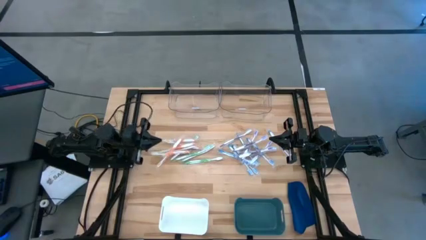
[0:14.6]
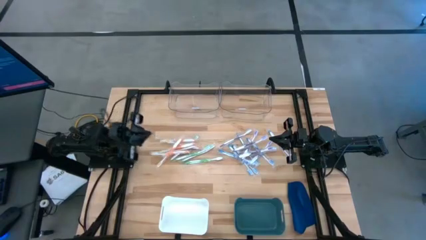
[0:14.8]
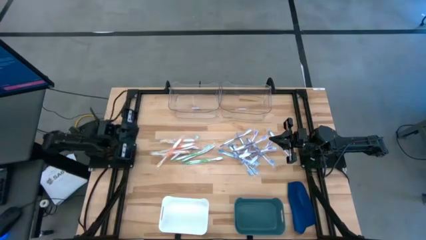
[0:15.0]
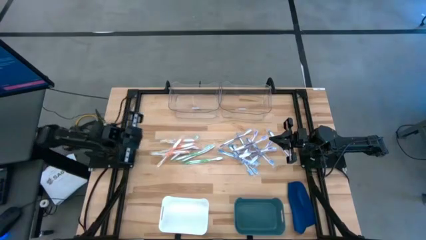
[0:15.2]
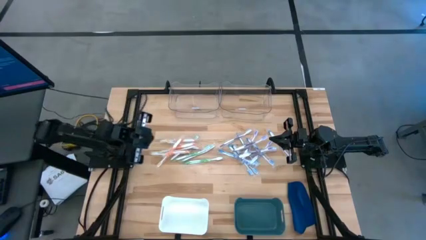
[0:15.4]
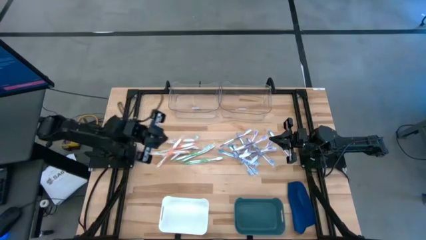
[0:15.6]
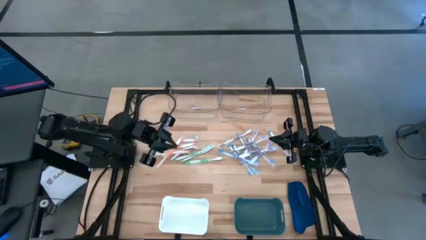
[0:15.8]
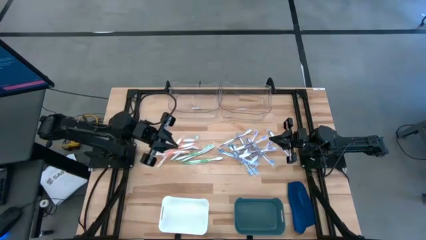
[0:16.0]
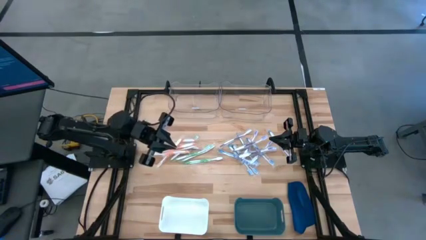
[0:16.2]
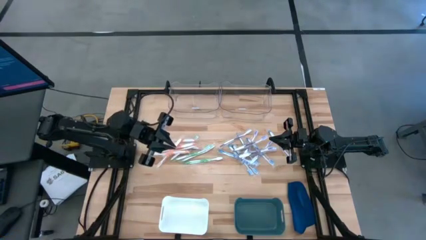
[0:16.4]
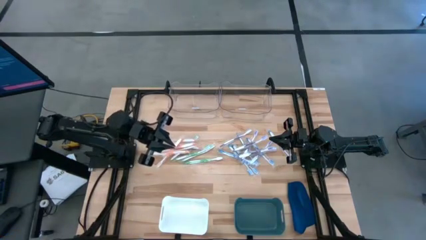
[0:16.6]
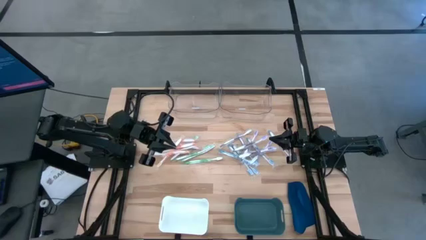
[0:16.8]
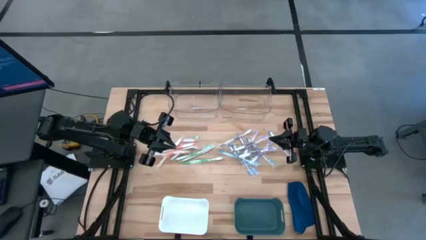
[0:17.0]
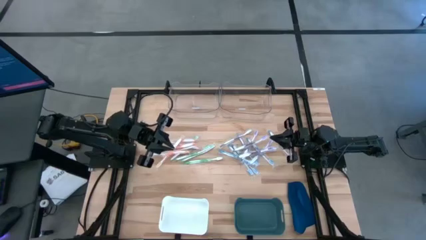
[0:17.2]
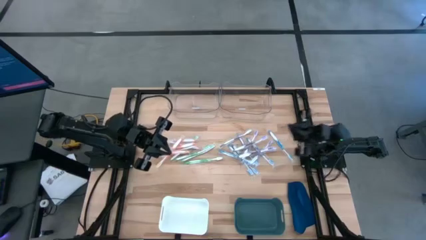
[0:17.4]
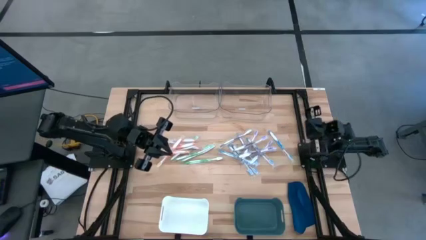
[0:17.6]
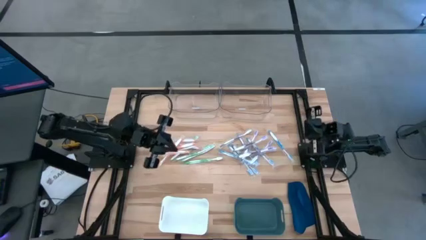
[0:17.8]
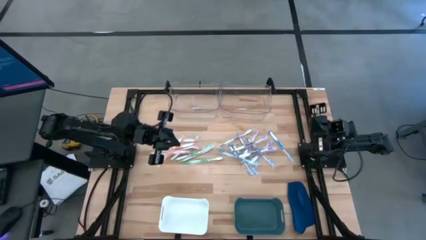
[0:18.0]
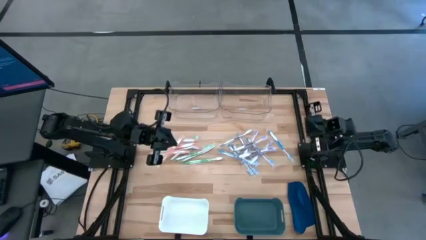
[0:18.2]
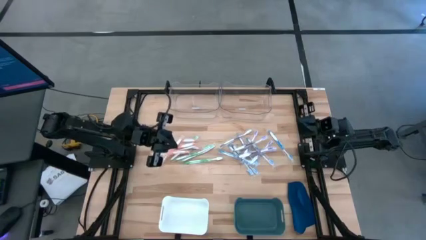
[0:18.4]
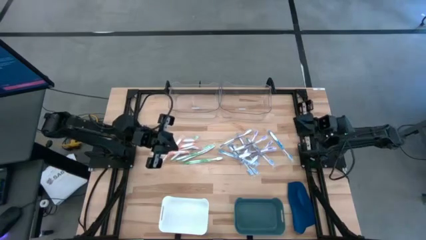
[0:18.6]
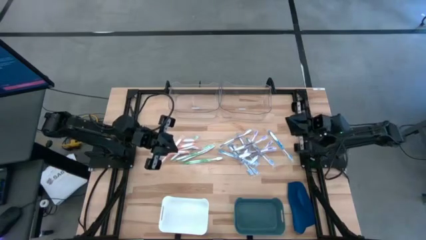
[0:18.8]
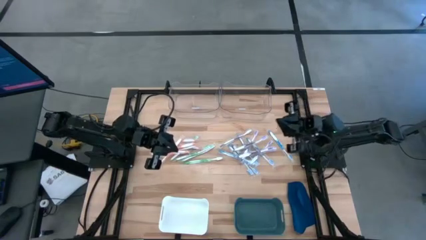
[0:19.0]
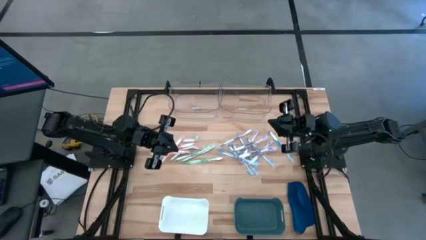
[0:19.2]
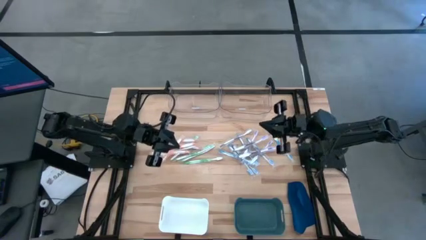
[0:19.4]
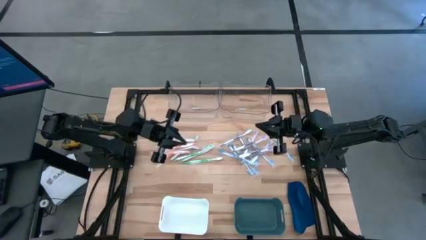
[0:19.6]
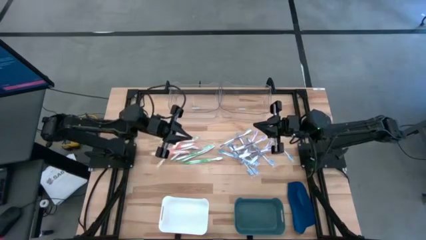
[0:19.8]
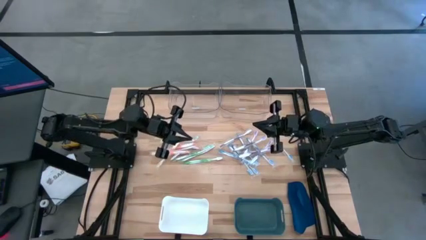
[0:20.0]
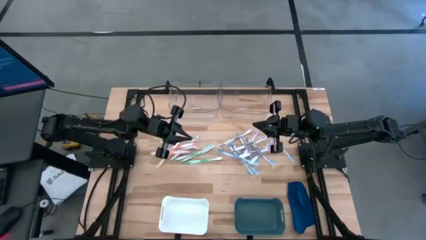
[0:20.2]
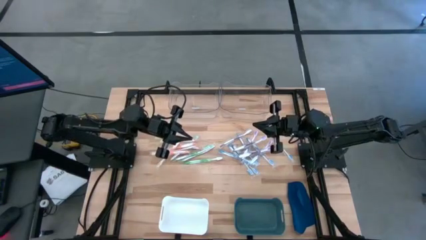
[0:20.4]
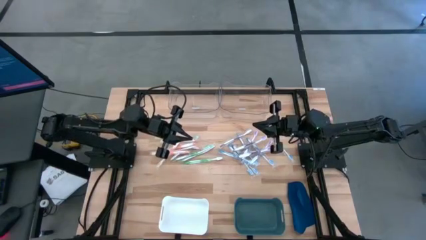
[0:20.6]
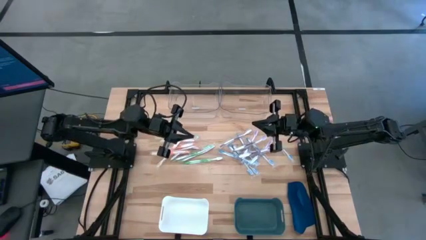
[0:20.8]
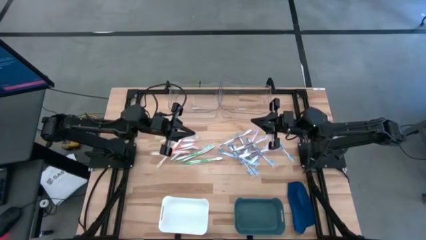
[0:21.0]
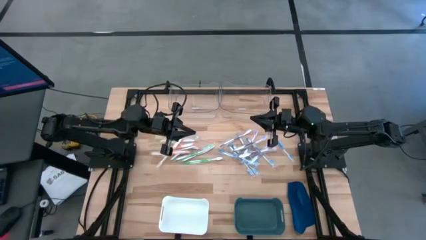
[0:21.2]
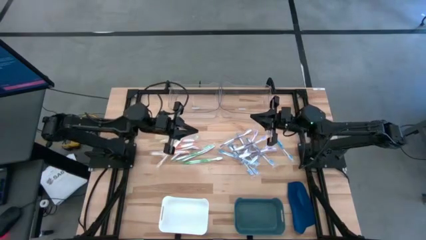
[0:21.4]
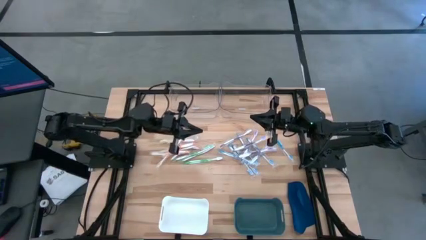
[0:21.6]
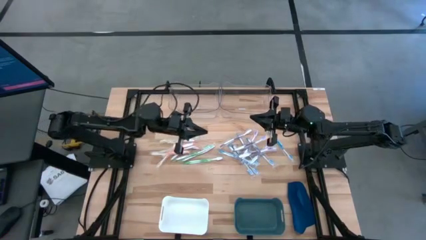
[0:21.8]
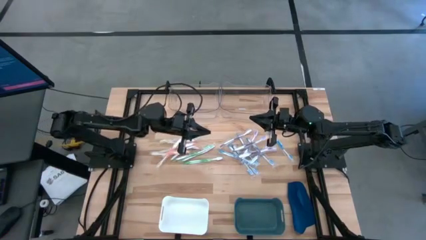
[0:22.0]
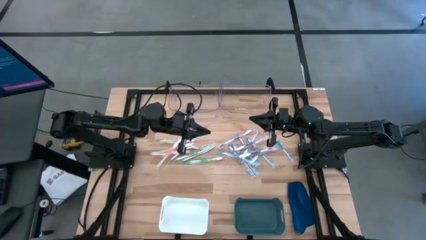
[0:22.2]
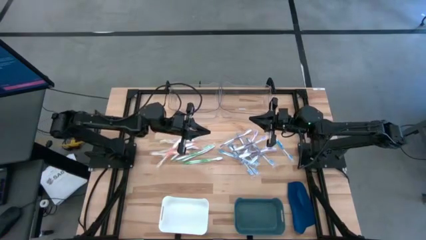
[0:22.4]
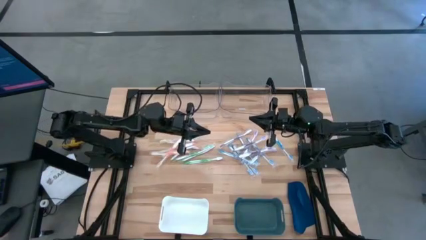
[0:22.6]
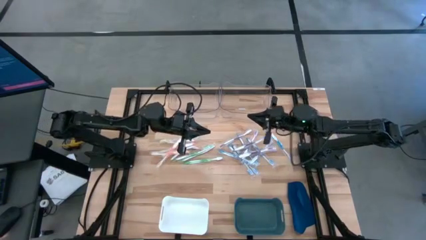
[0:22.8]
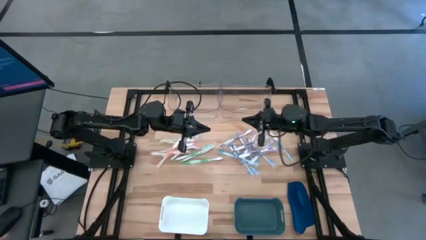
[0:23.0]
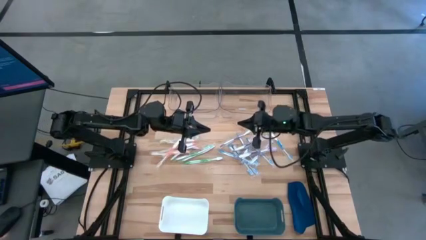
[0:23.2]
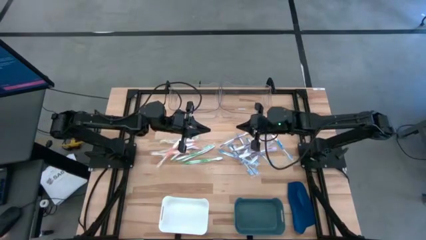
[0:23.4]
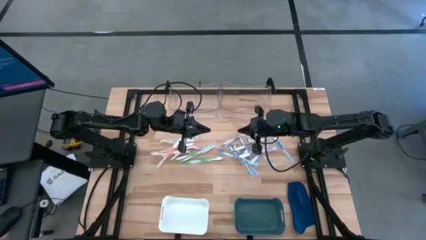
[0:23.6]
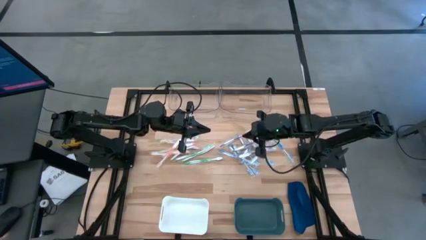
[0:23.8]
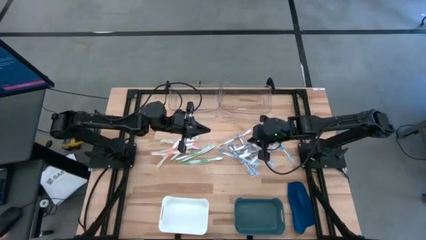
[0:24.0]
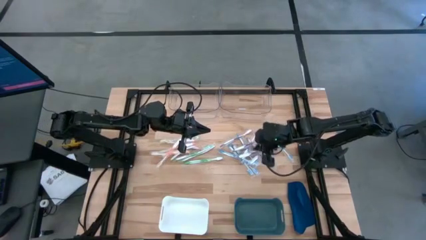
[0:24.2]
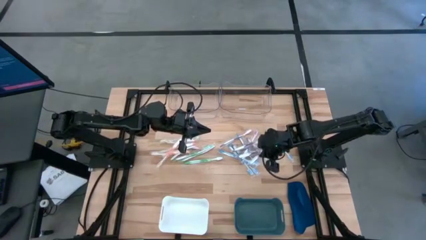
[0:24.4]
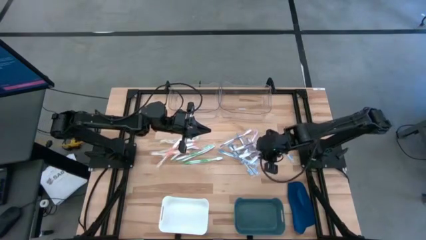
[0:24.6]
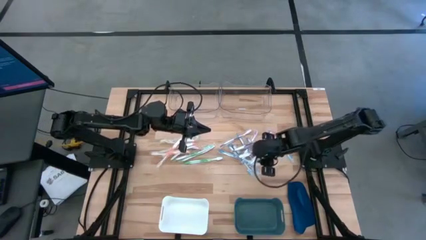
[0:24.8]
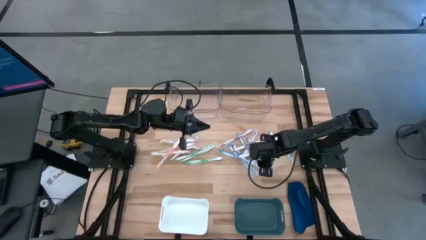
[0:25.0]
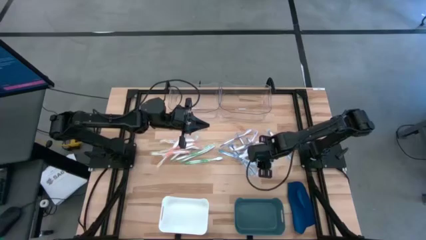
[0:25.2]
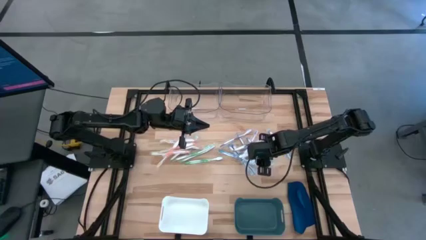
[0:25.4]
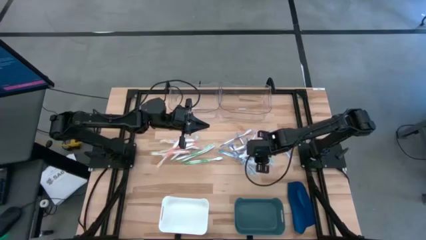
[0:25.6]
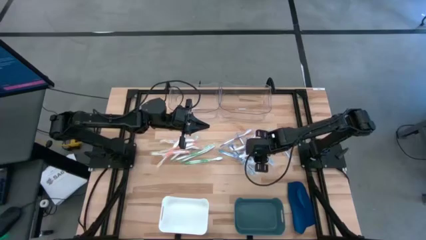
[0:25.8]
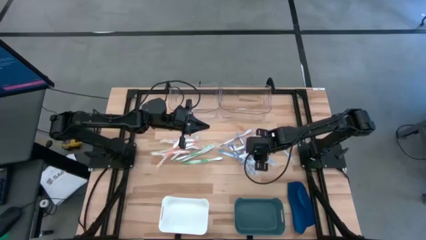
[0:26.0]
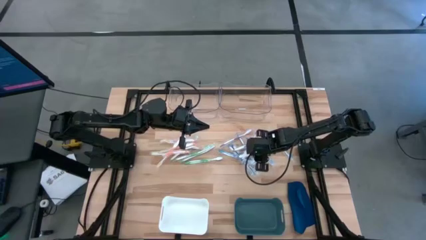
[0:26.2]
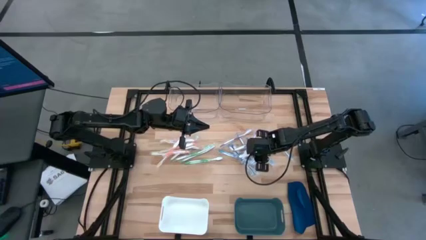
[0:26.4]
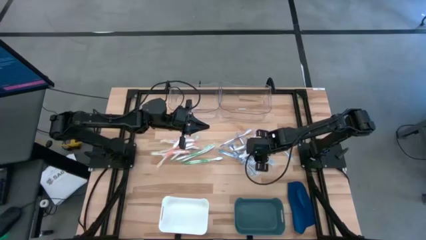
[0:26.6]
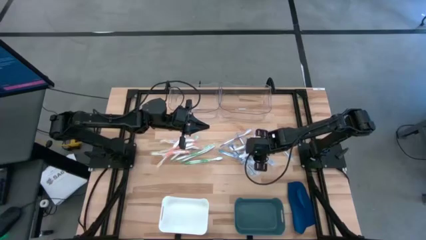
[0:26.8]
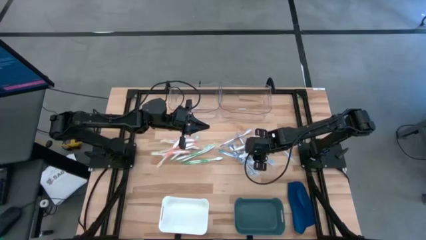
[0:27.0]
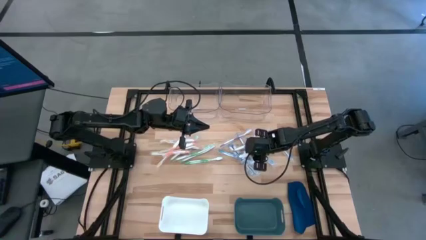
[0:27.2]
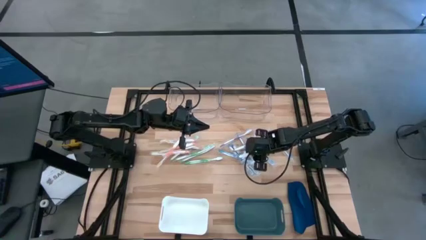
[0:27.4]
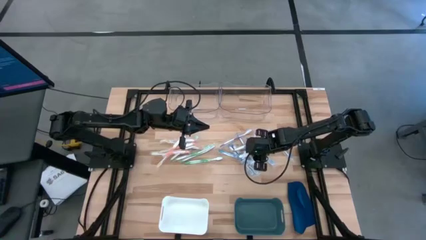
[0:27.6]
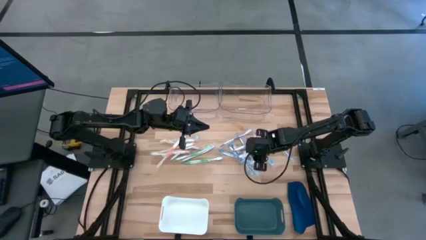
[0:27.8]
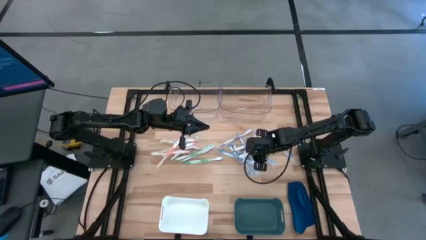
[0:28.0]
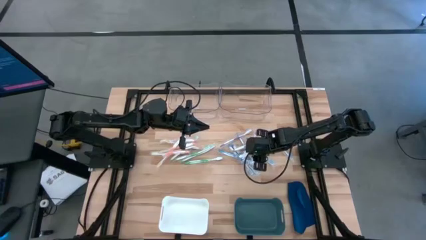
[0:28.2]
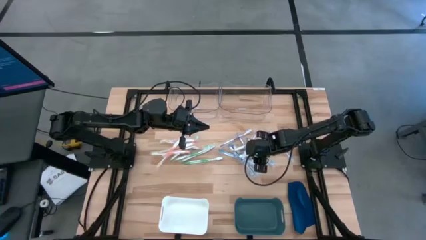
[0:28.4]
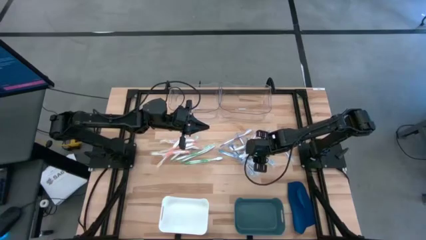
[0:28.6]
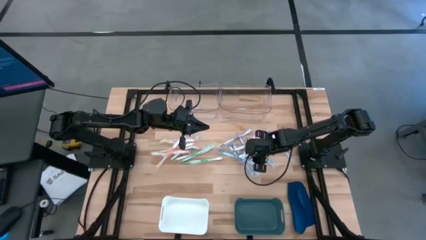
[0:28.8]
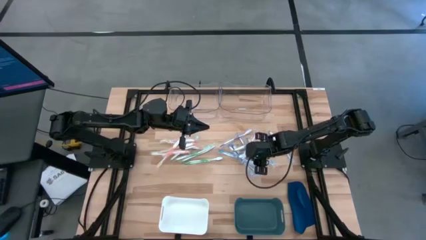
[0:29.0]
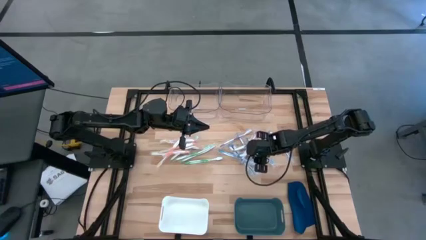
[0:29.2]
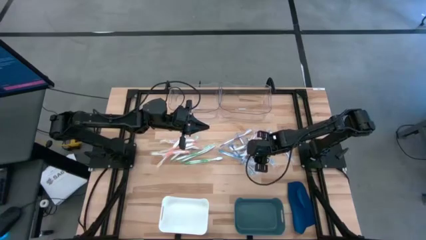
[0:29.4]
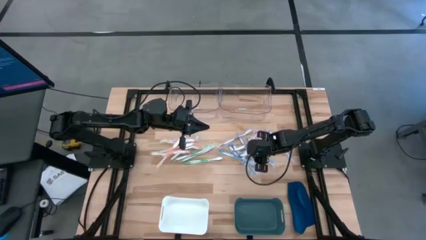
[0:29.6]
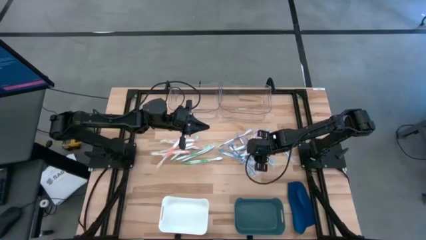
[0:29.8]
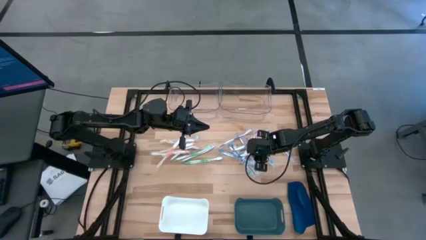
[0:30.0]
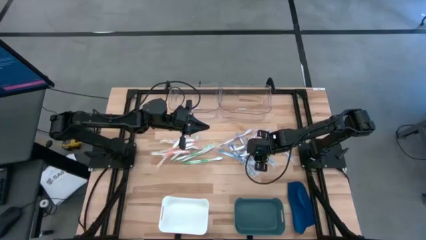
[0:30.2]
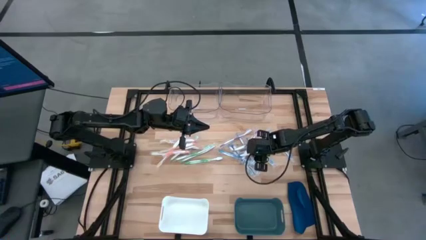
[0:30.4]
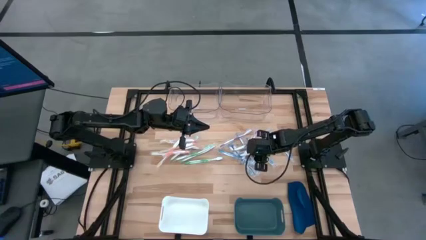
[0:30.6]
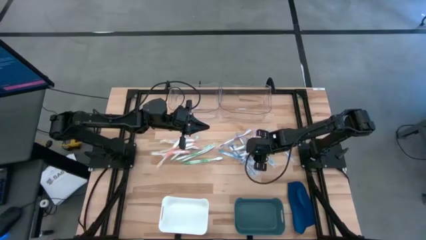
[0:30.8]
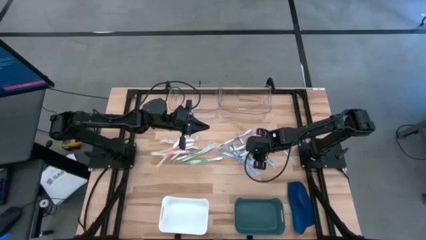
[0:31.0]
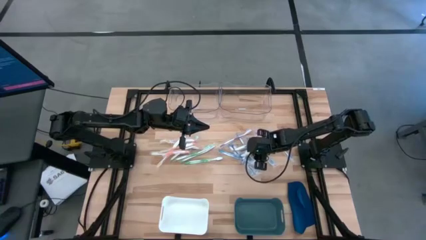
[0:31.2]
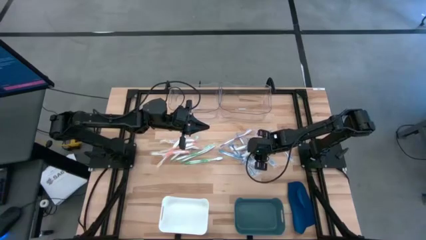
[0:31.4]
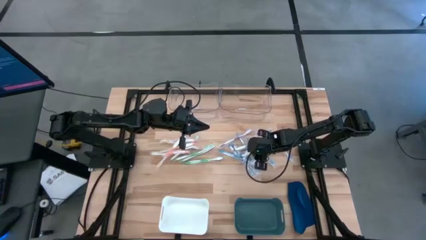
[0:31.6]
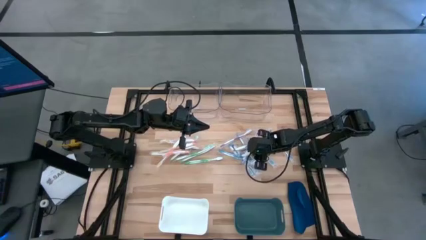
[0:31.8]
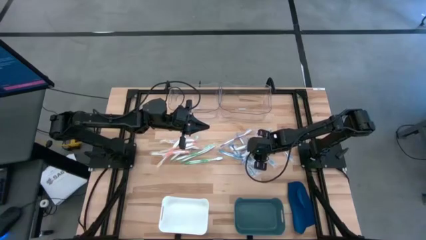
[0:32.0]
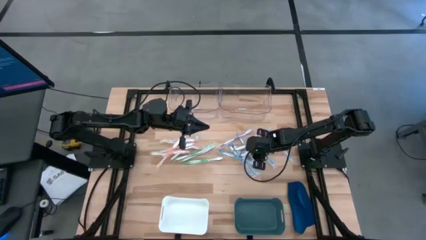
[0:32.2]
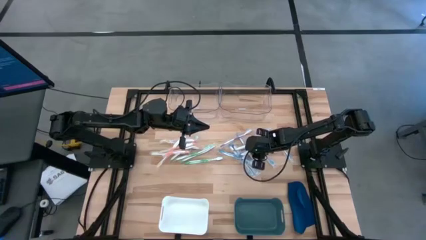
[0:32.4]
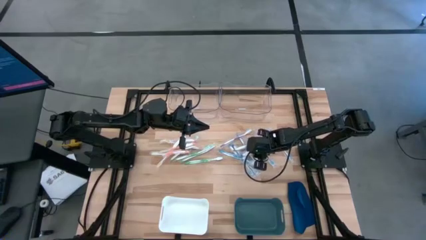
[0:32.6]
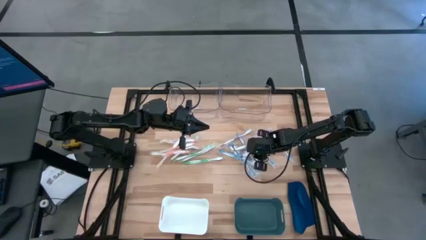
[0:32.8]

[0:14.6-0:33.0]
Task: Pick & Place Toothbrushes
Put the purple toothbrush into the right transparent bin
